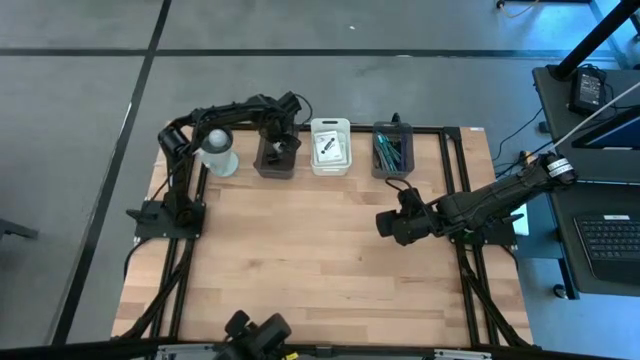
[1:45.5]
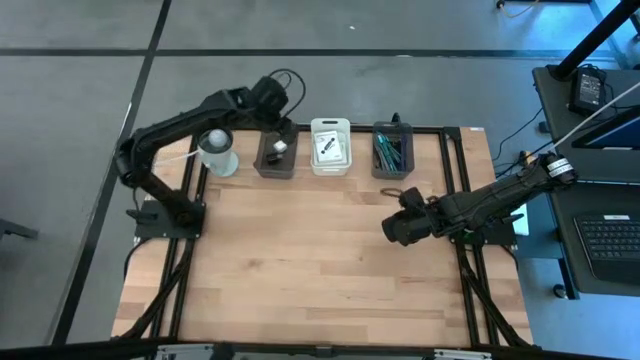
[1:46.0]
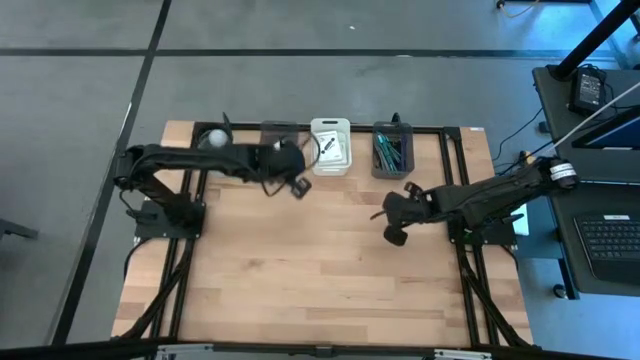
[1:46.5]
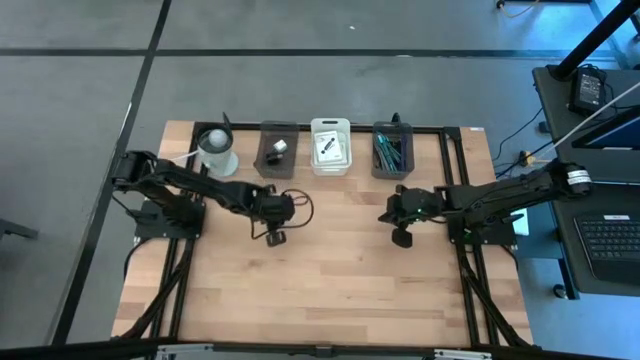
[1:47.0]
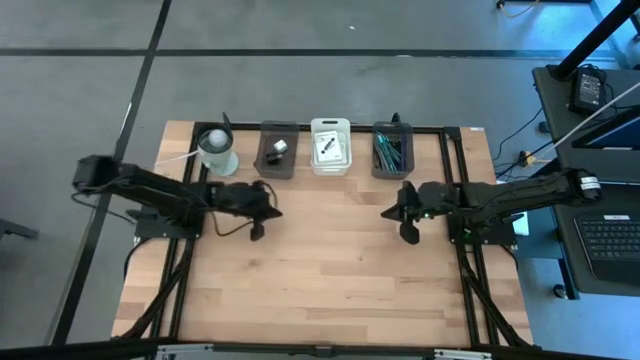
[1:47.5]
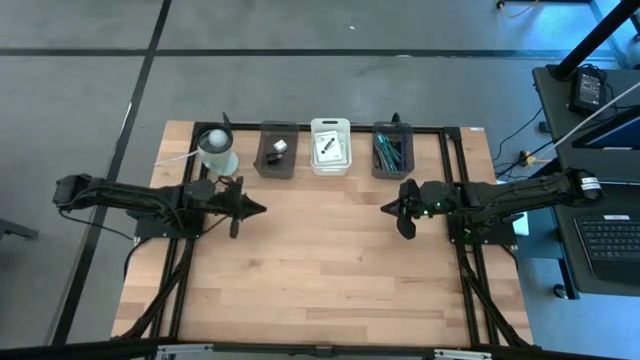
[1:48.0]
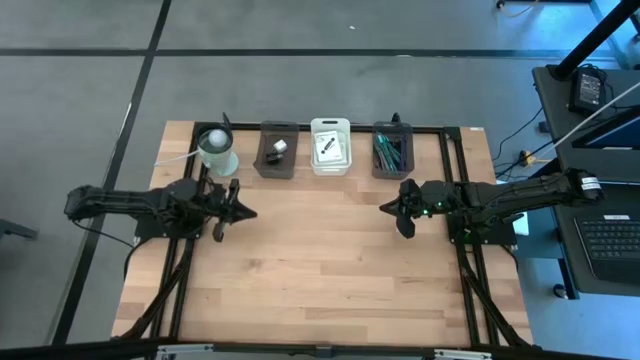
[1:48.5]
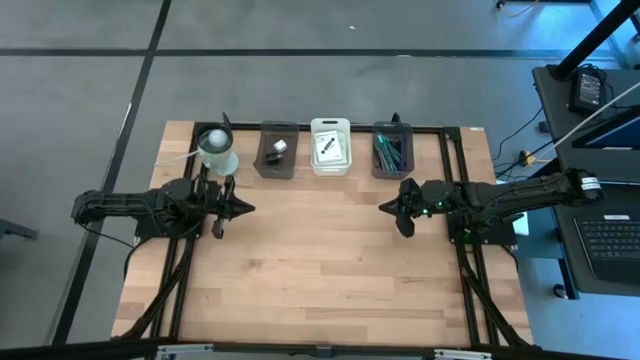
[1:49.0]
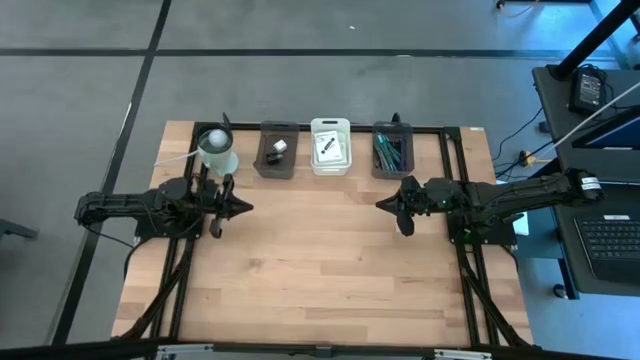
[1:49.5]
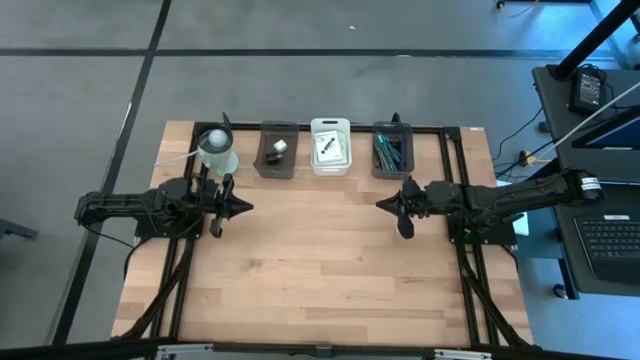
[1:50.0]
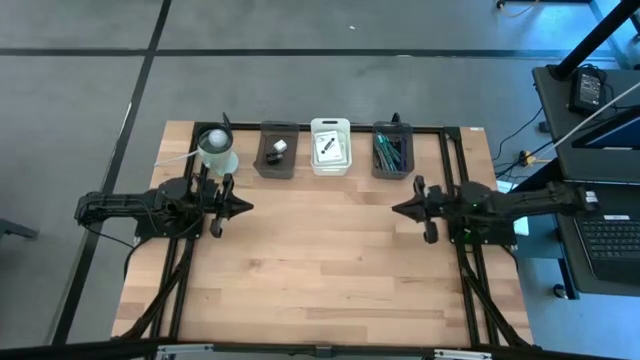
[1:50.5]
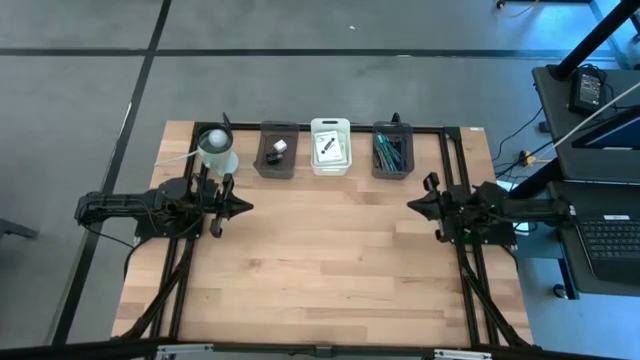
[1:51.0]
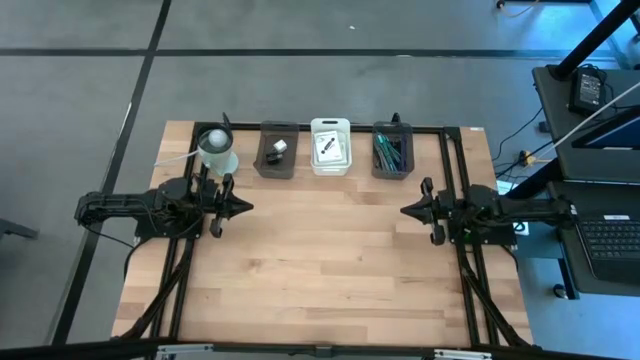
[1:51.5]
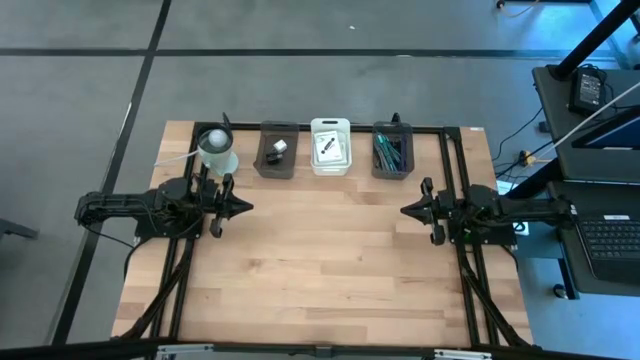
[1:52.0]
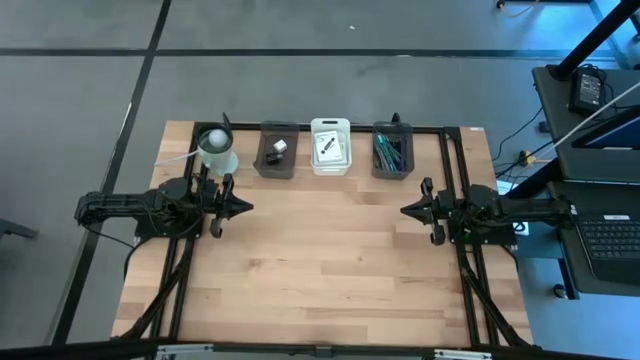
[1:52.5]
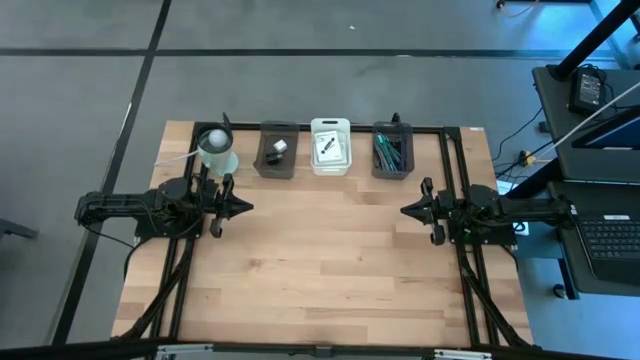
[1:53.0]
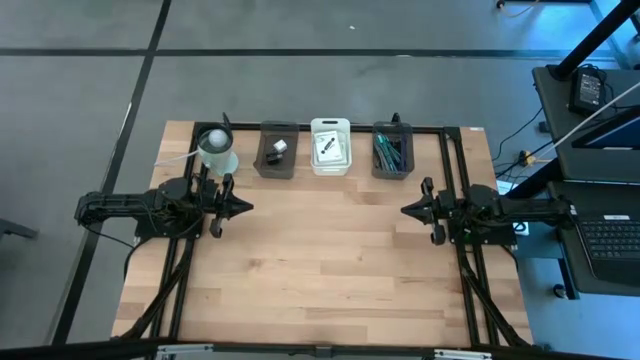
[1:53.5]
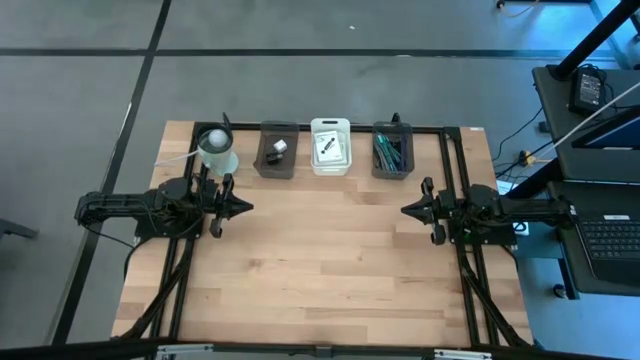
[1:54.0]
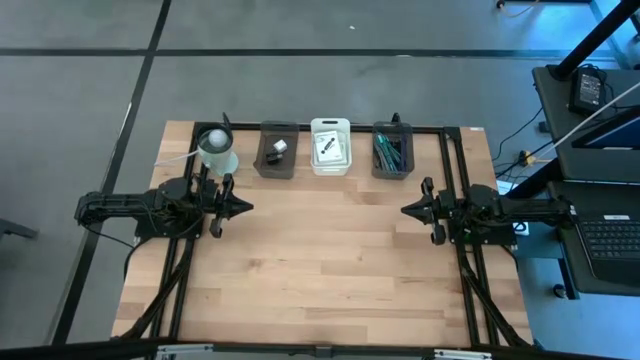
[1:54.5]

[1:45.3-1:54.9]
Task: Pick and place items into bin
Return to Home Position

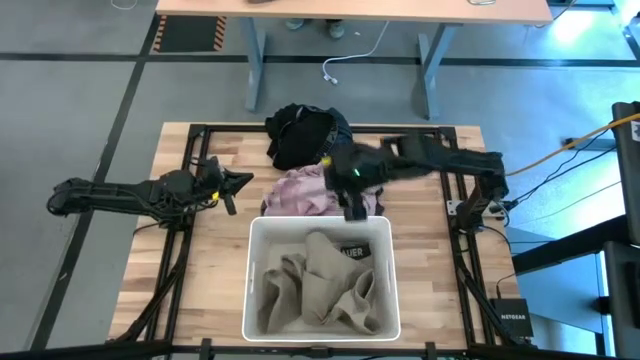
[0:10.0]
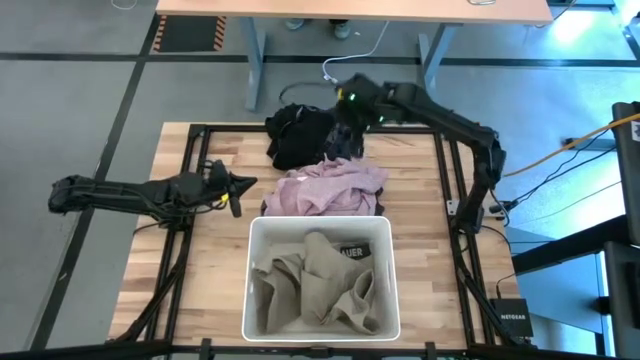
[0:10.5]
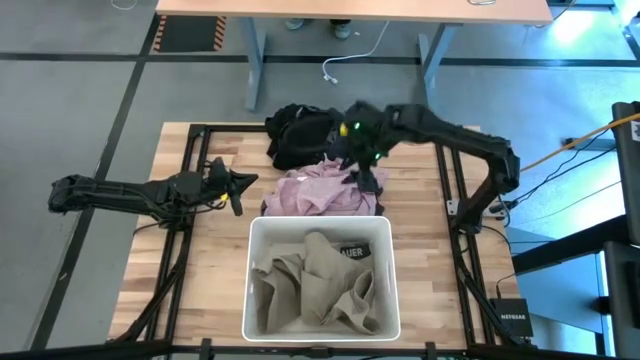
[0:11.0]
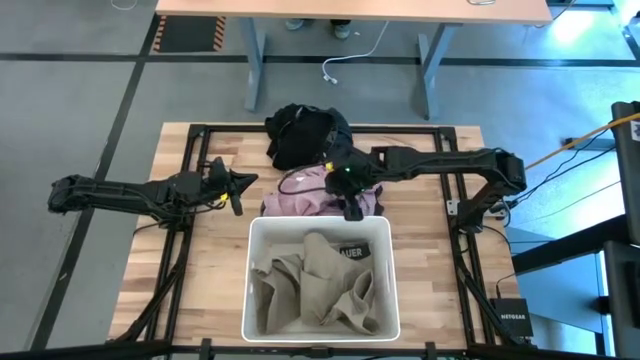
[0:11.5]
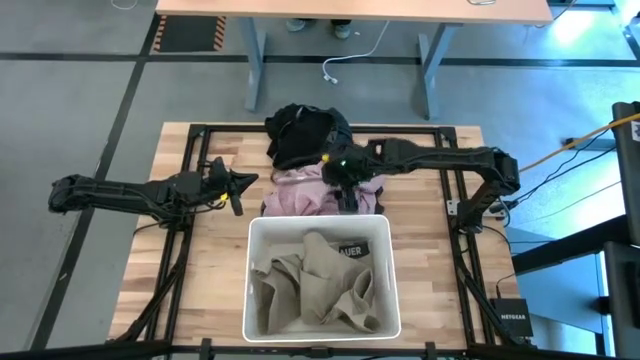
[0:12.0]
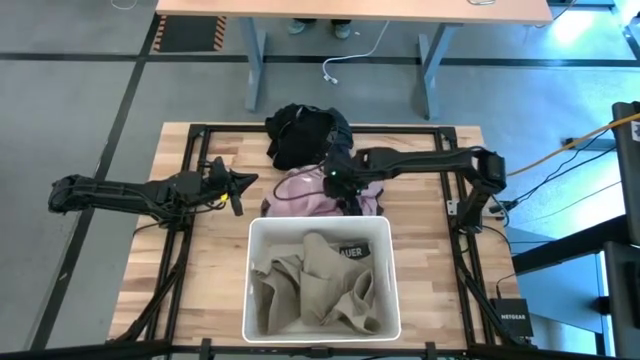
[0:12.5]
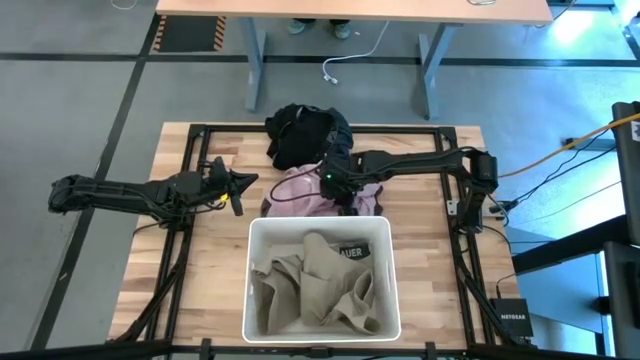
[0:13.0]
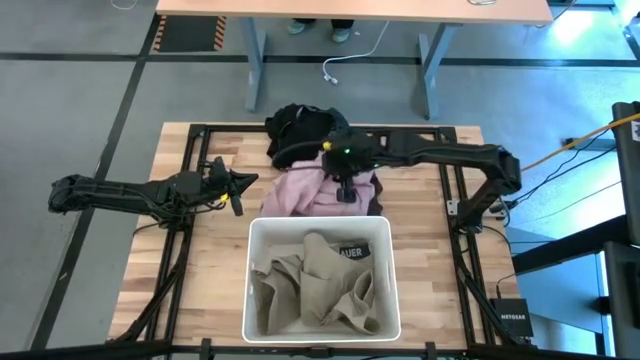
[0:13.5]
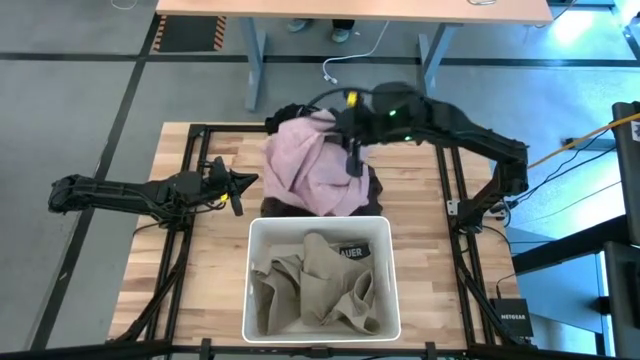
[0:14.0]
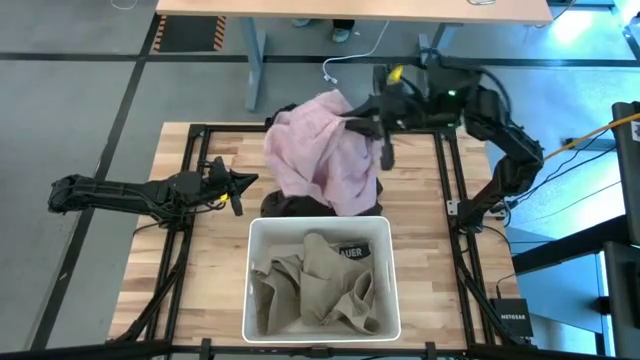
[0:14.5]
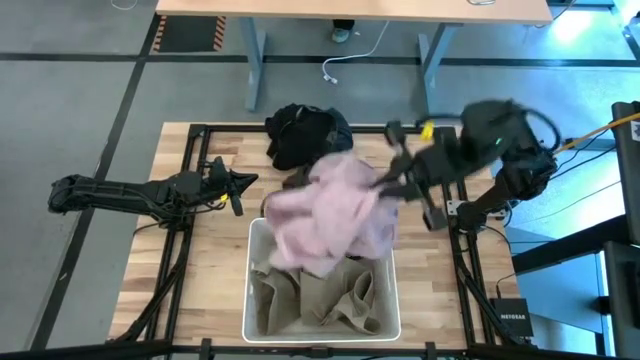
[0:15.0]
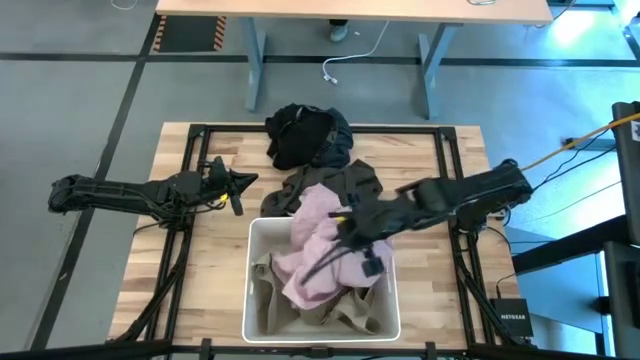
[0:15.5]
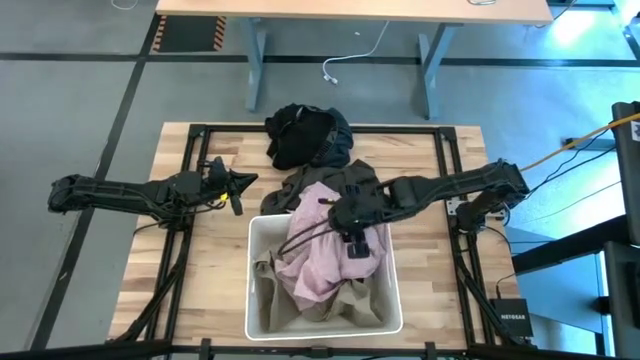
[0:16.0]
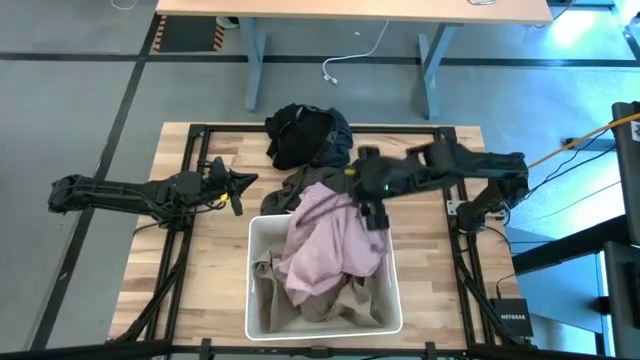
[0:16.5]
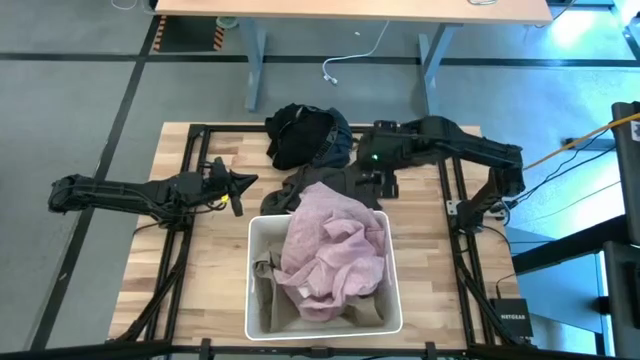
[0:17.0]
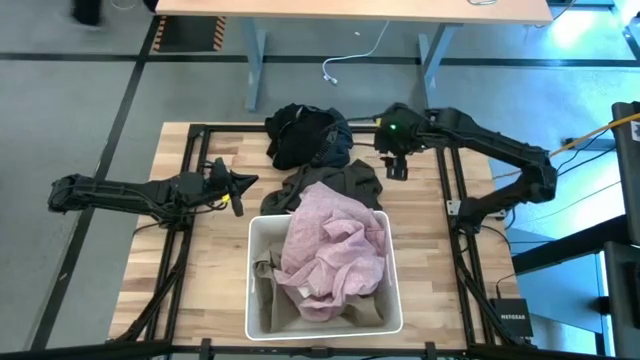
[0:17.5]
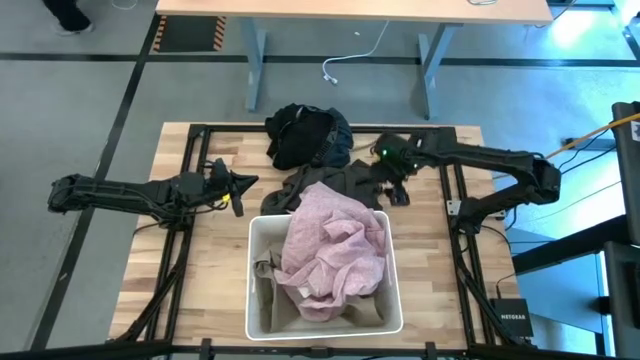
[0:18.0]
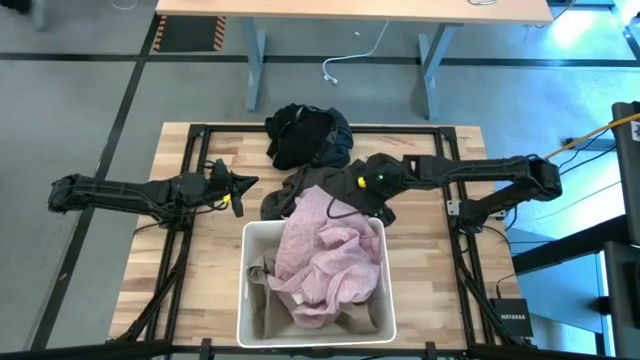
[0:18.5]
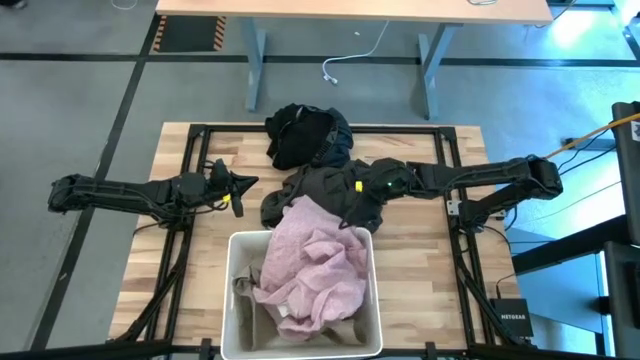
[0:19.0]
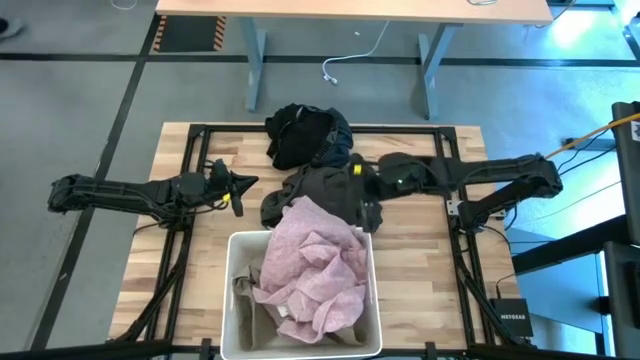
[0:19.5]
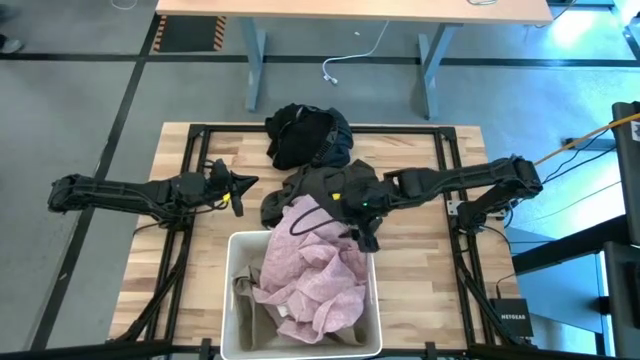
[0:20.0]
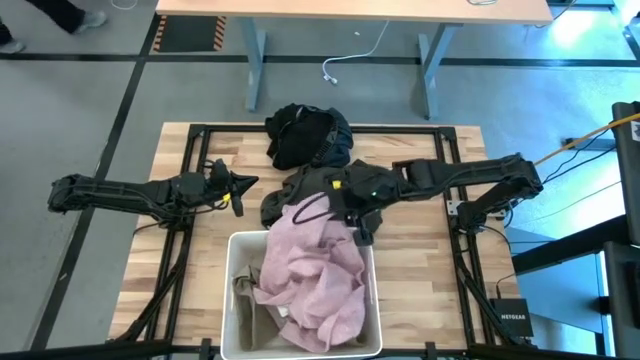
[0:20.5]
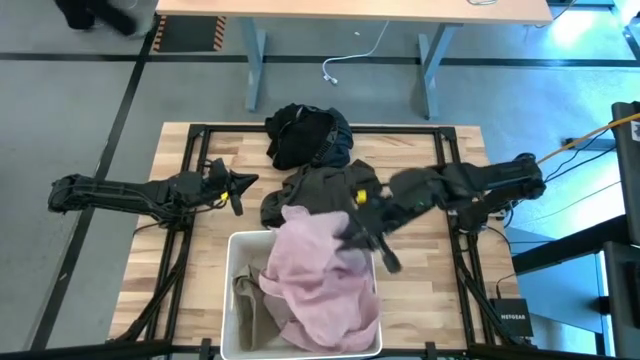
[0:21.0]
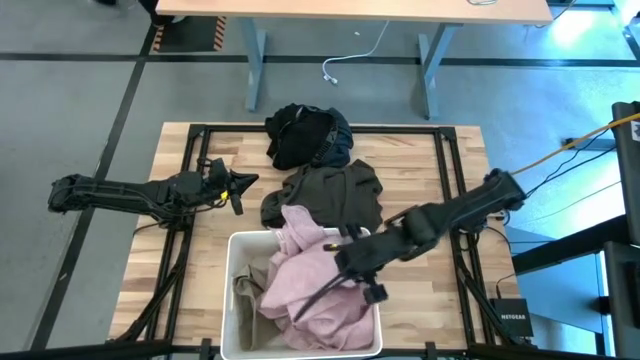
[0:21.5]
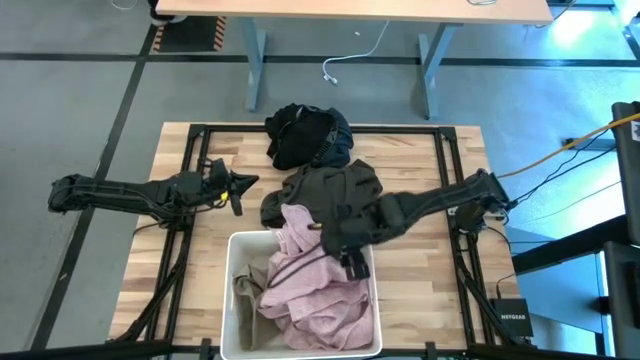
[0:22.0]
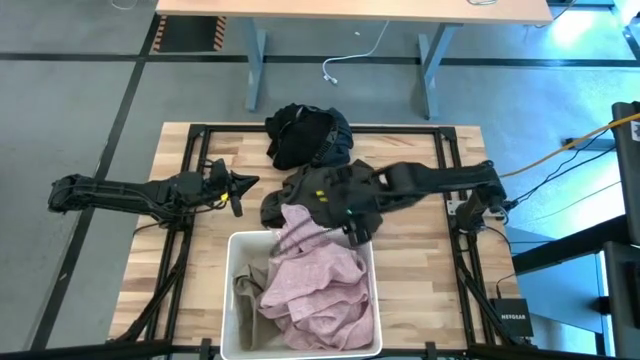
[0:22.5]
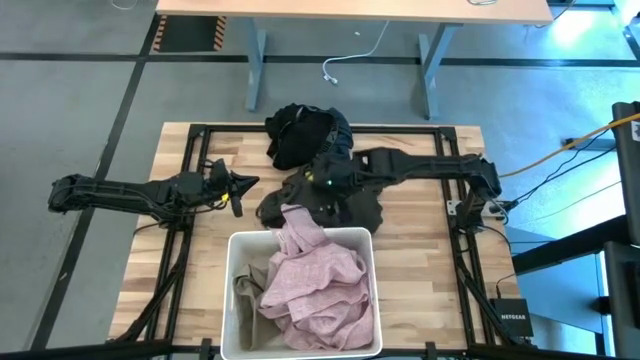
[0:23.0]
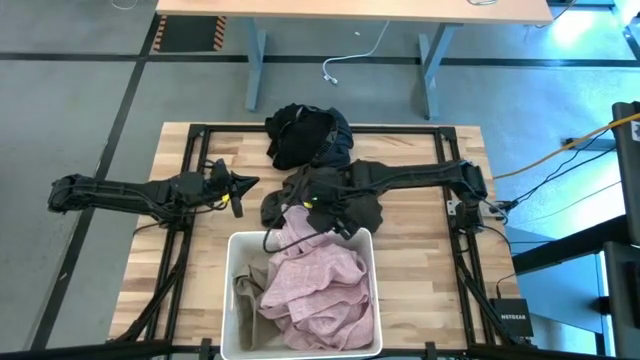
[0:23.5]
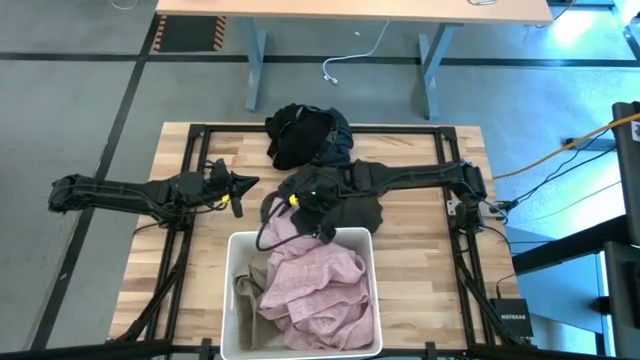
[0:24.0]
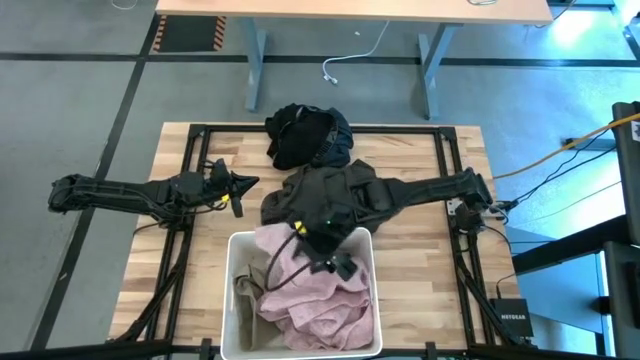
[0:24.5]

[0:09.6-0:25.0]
Task: Sort clothes
Put the pink shirt into the white bin
